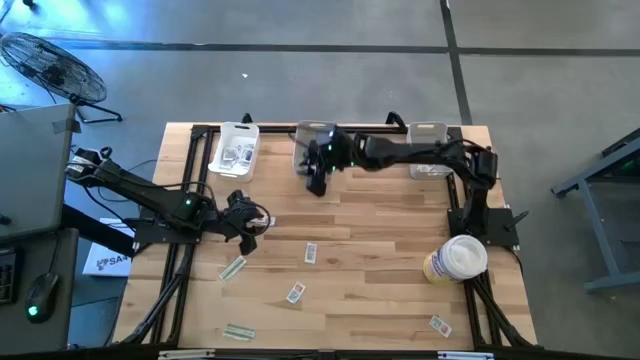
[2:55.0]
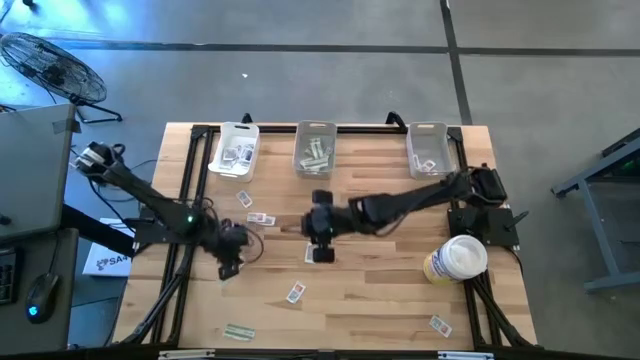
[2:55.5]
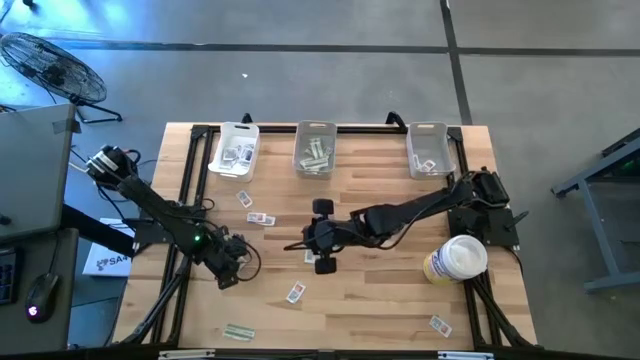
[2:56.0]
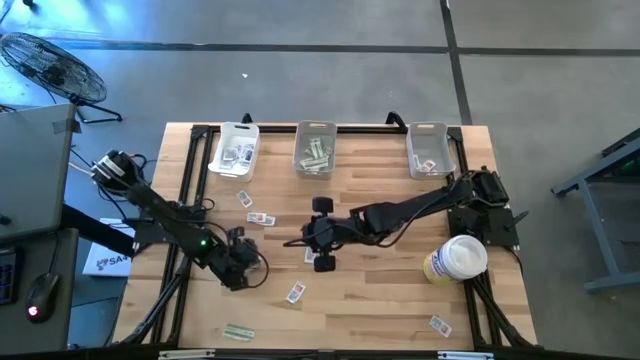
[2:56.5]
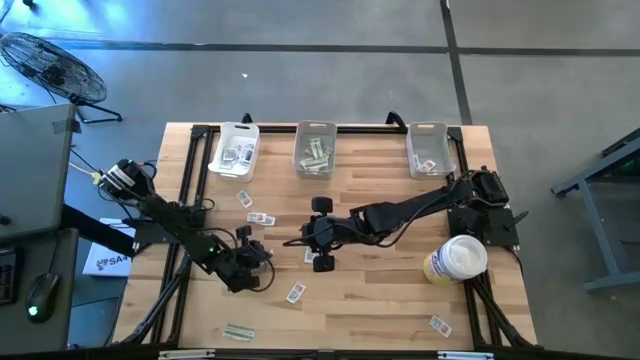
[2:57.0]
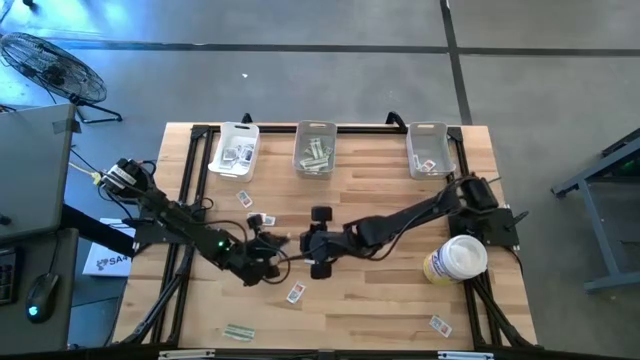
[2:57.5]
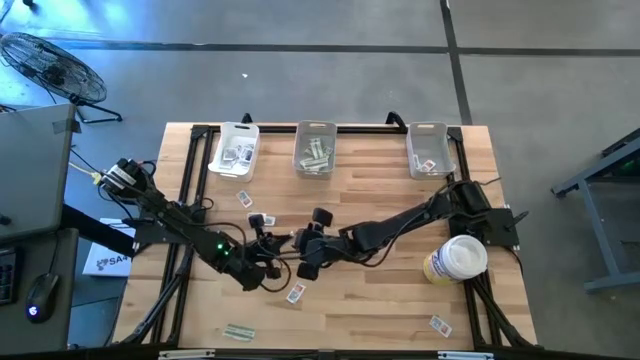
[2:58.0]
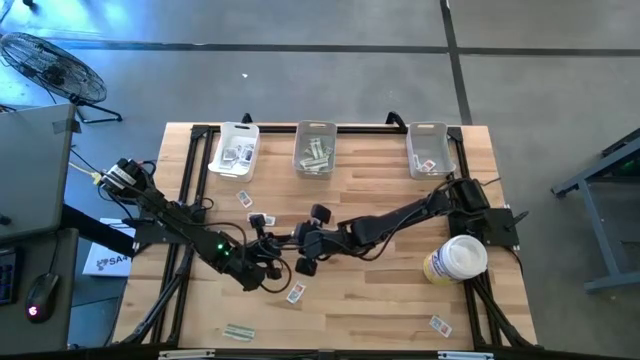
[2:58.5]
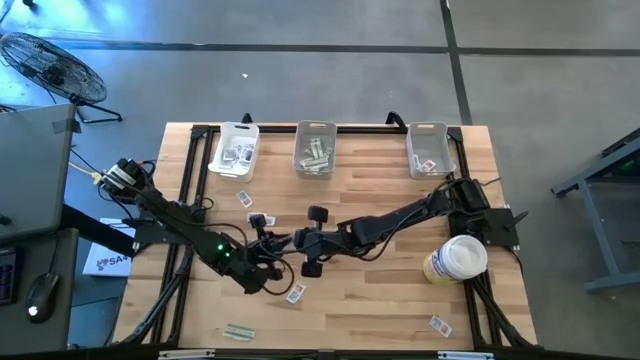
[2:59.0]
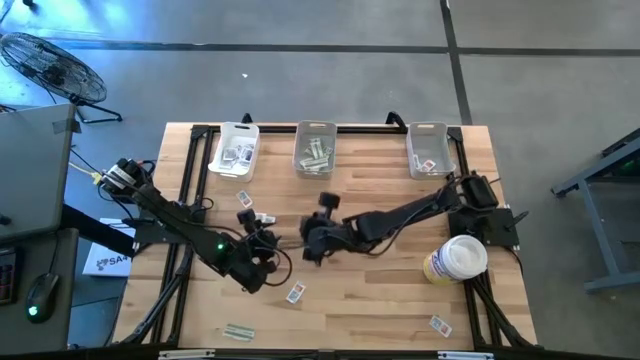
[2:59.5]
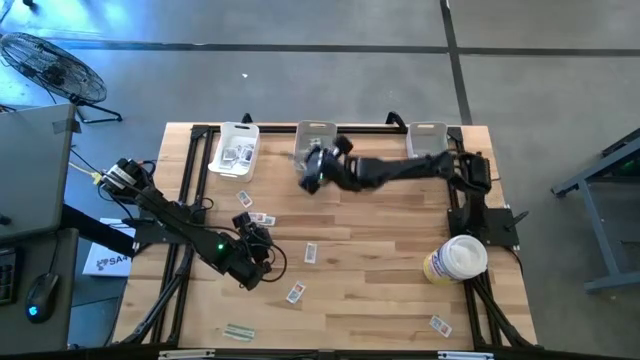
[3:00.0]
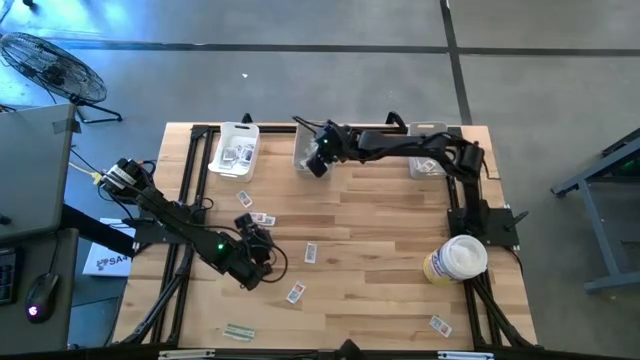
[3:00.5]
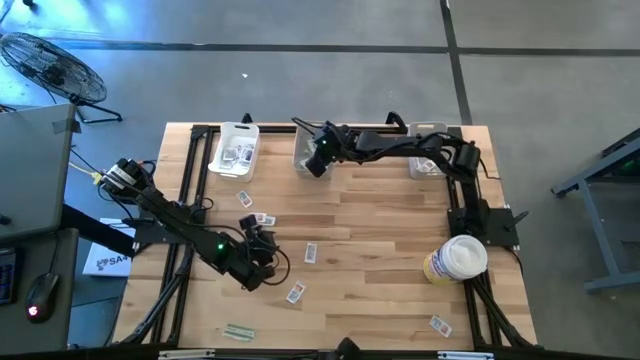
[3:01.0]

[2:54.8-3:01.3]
Task: Pick & Place First Aid Supplies
Put the green pad into the left gray bin

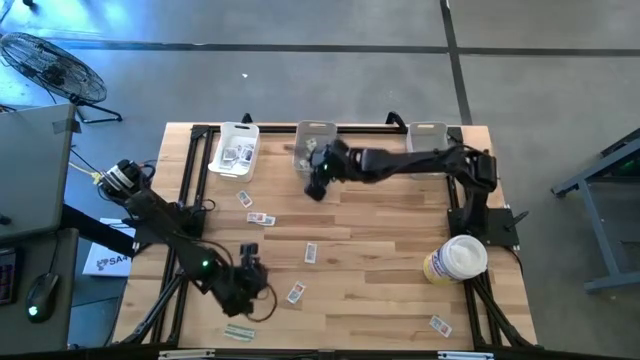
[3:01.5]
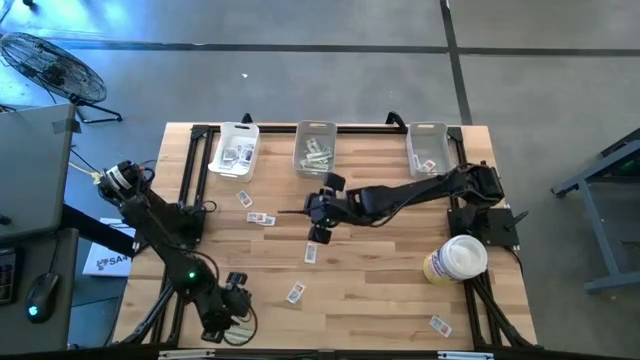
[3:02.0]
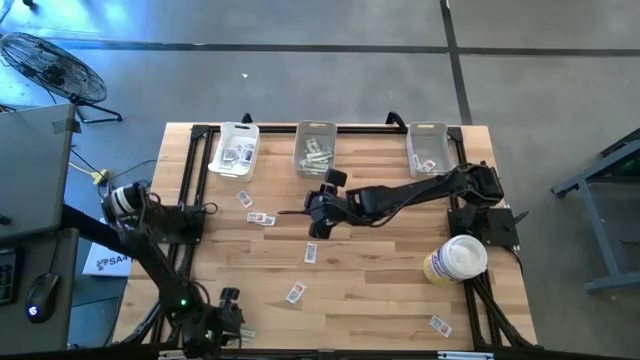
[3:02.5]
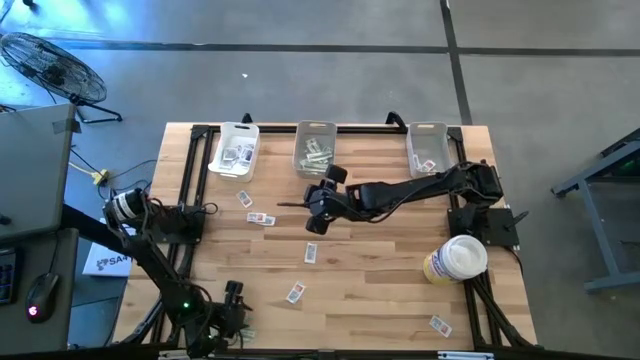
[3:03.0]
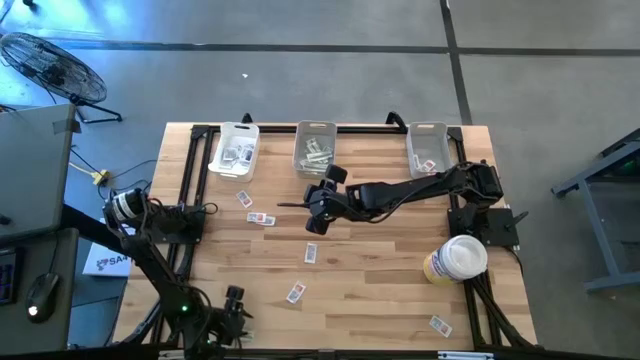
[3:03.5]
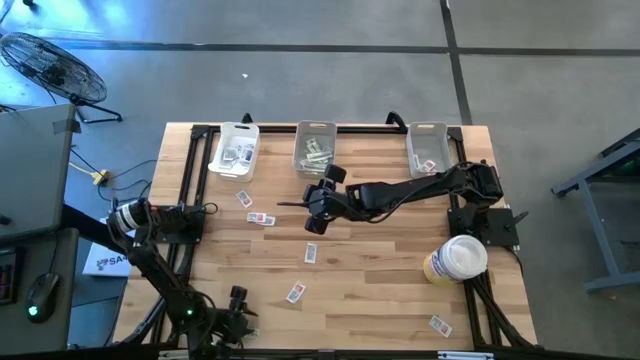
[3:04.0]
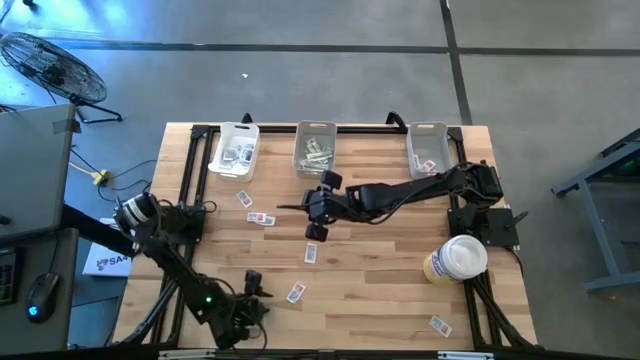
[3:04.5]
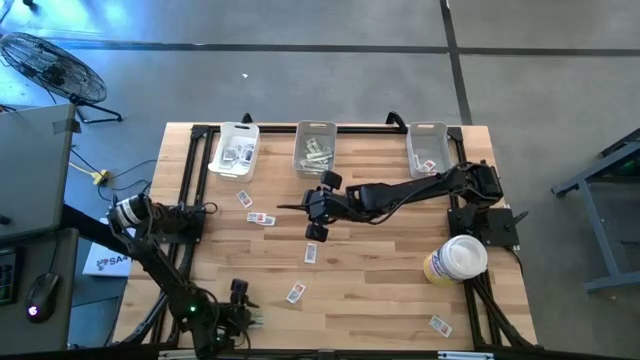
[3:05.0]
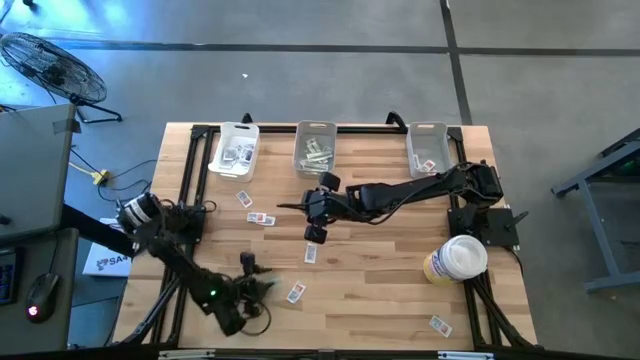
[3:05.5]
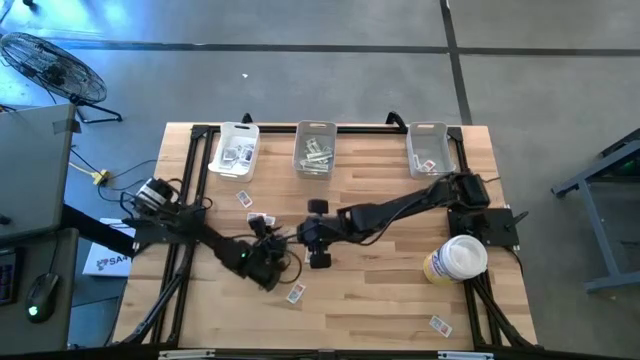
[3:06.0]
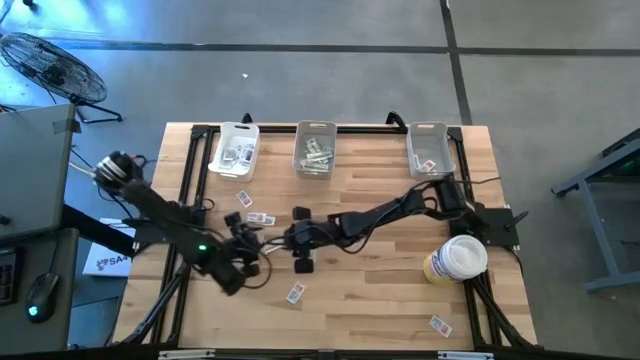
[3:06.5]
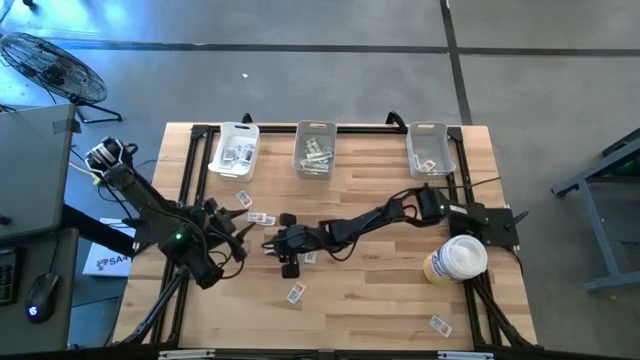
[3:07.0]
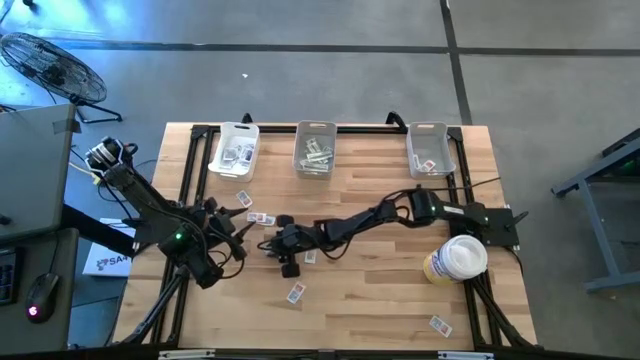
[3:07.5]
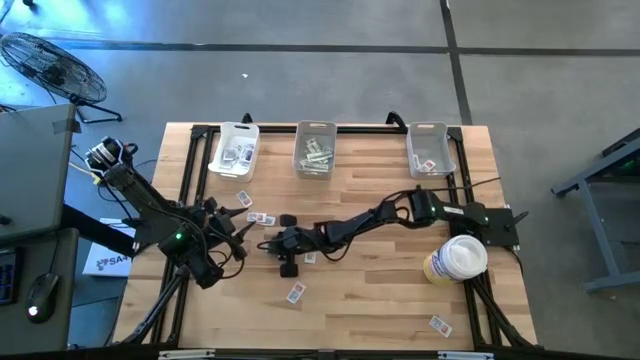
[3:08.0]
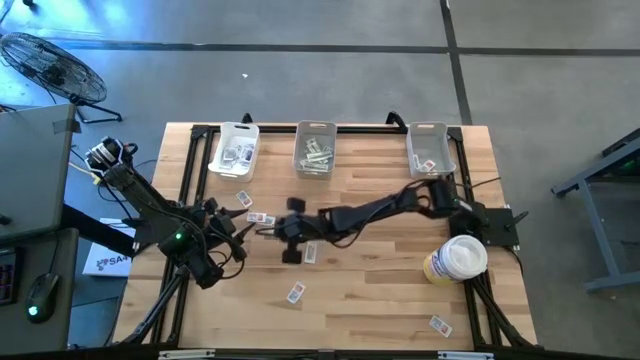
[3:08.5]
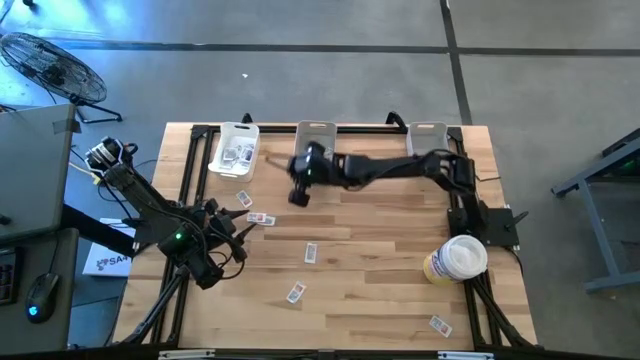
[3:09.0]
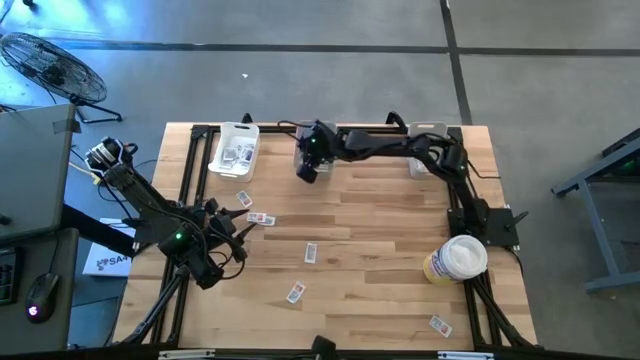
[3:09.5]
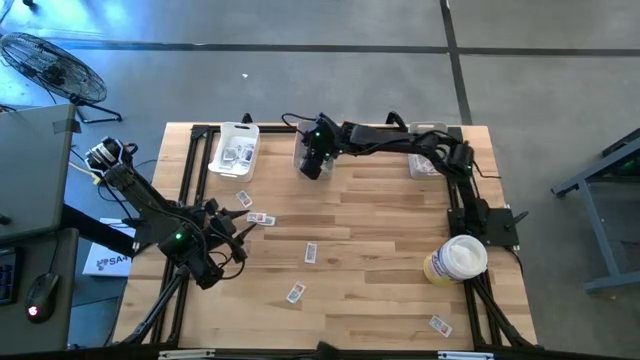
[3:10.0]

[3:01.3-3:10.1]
Put the green pad into the left gray bin

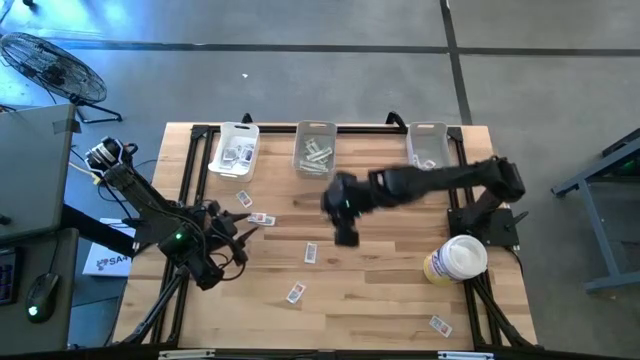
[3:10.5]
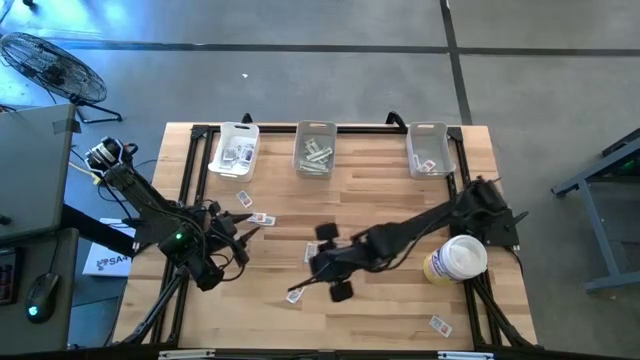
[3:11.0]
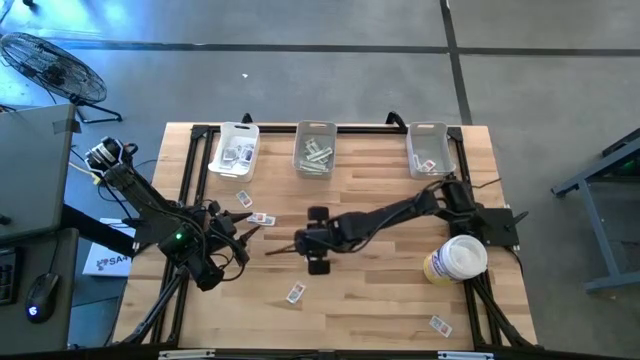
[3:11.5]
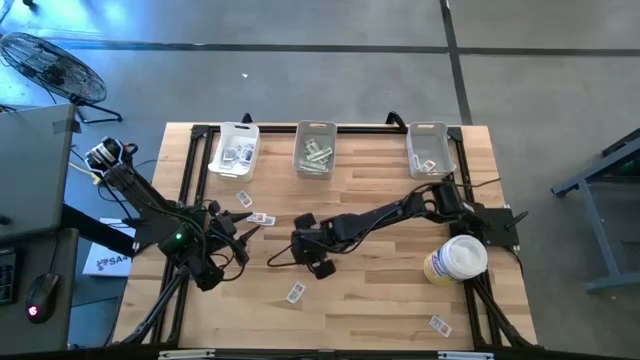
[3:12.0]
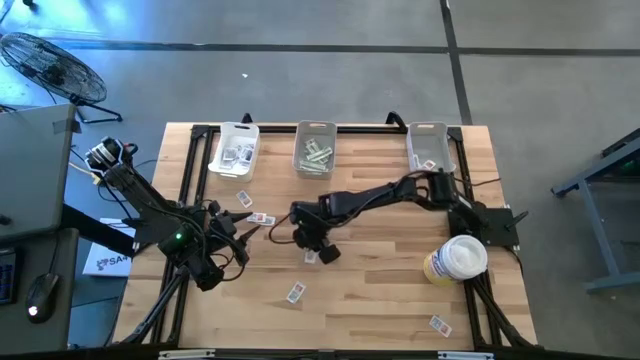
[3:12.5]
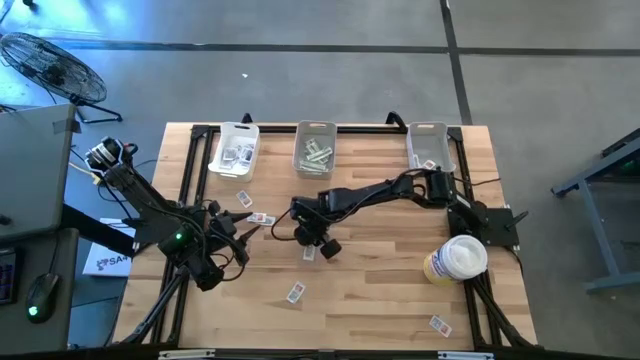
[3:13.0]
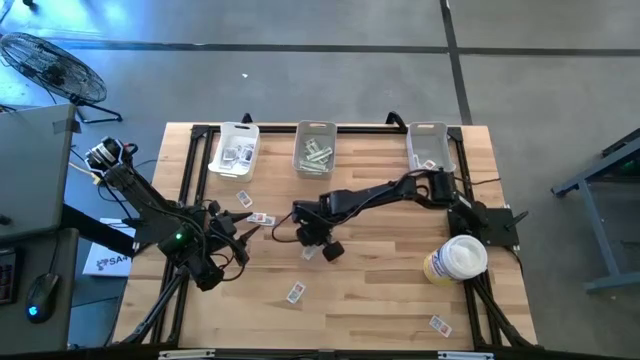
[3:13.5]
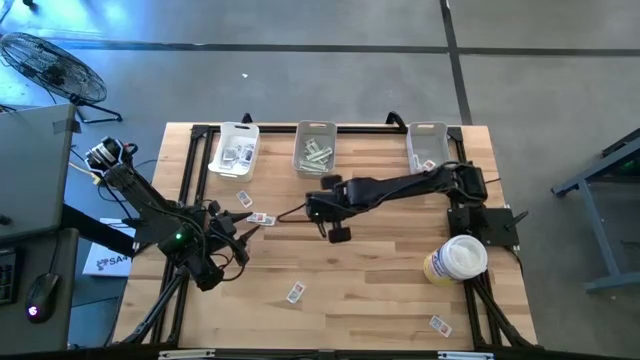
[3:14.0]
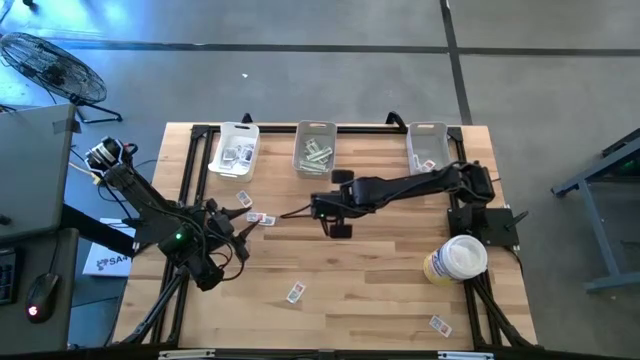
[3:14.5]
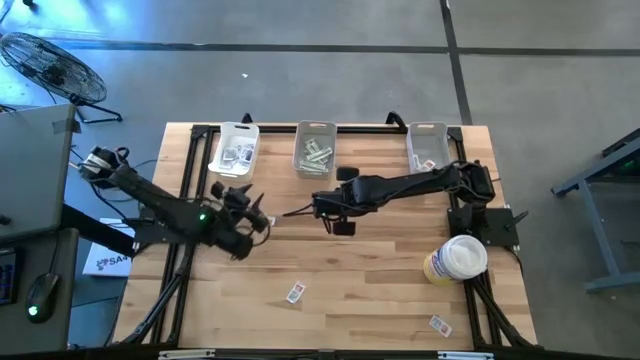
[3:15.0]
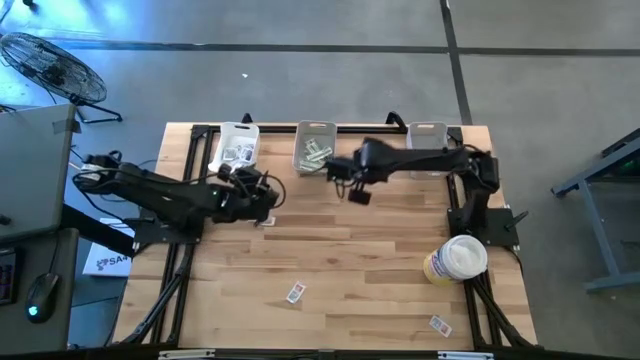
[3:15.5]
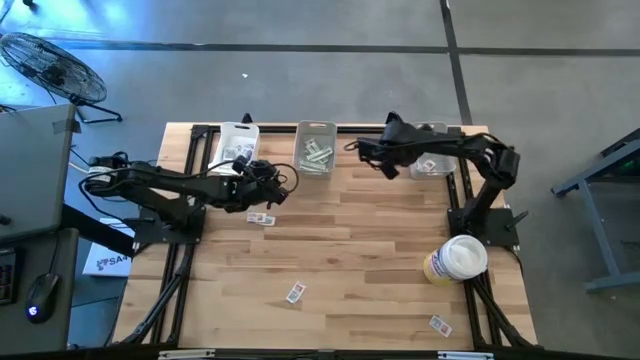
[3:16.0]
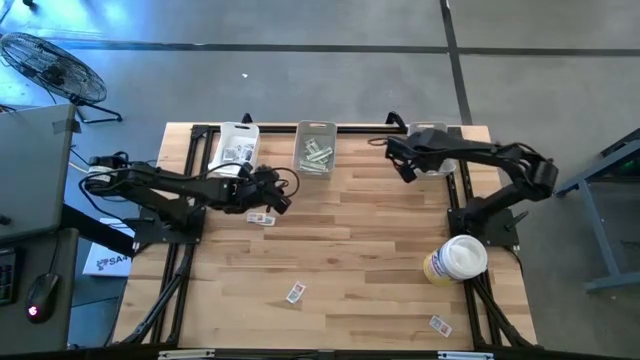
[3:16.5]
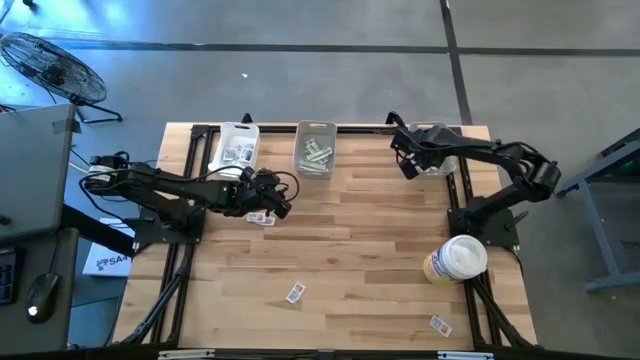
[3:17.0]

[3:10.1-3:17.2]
Put the orange pad into the right gray bin

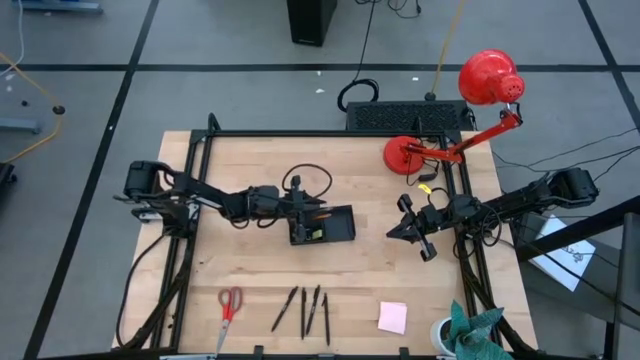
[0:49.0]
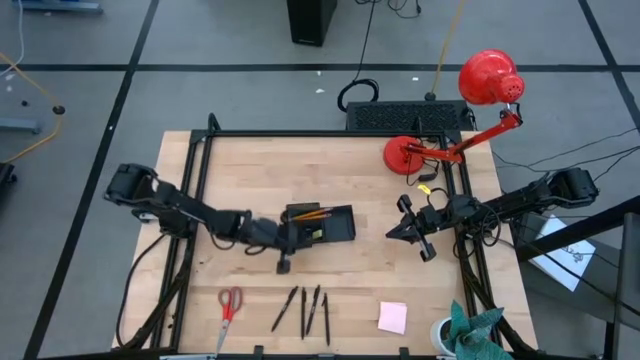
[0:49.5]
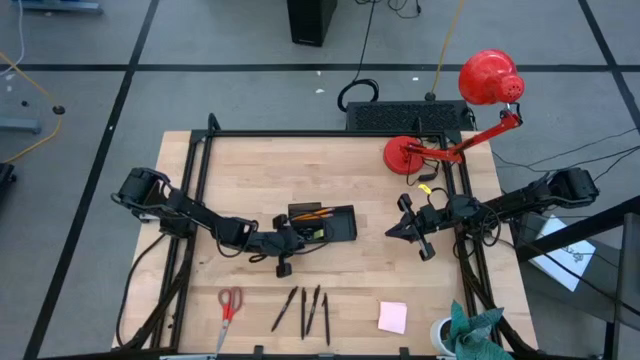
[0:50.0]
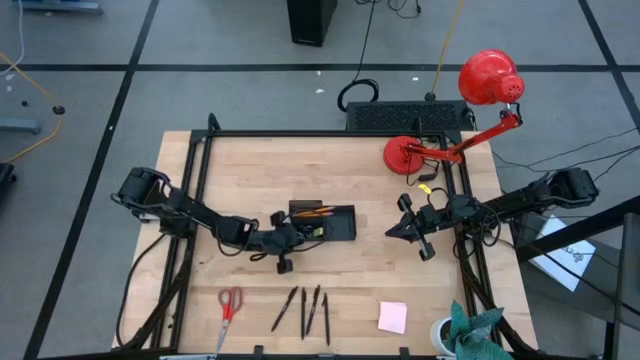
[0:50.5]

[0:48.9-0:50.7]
Task: Pick and place office supplies into organizer
Adjust the desk organizer
